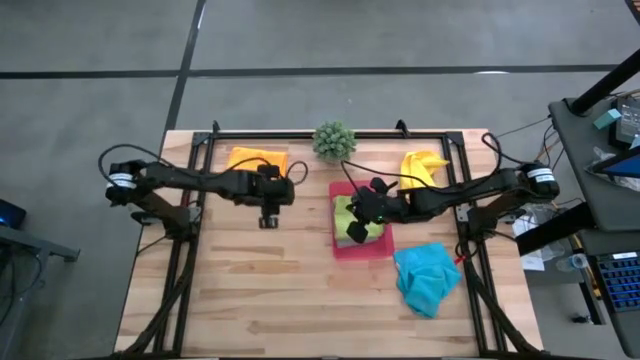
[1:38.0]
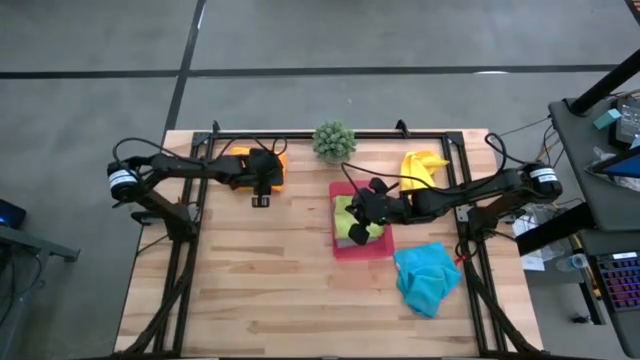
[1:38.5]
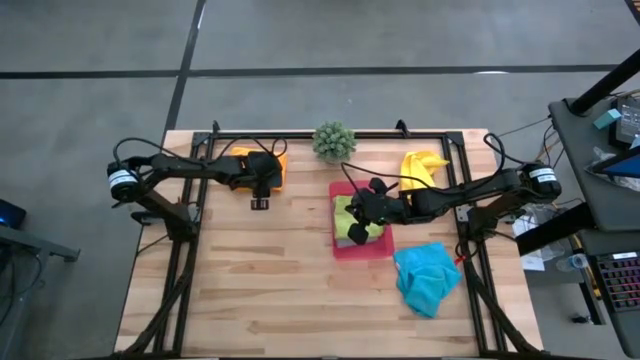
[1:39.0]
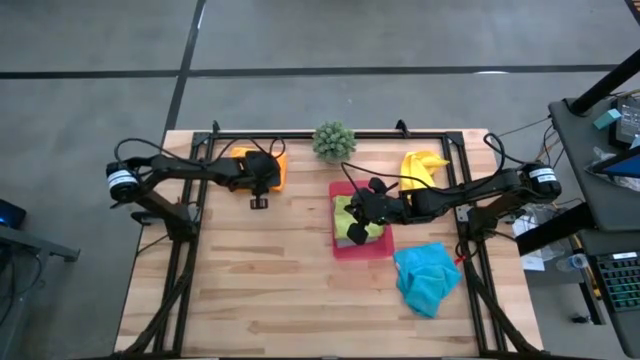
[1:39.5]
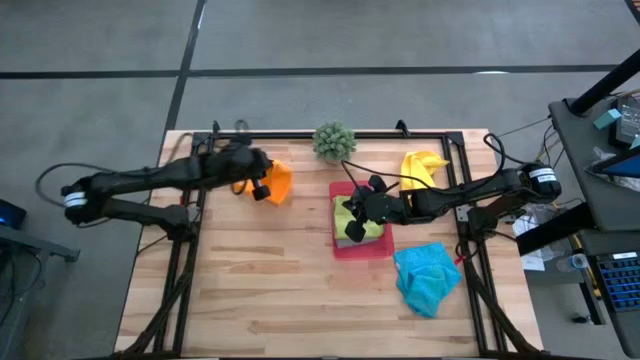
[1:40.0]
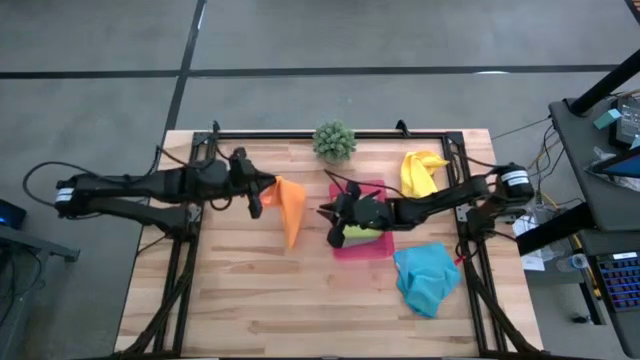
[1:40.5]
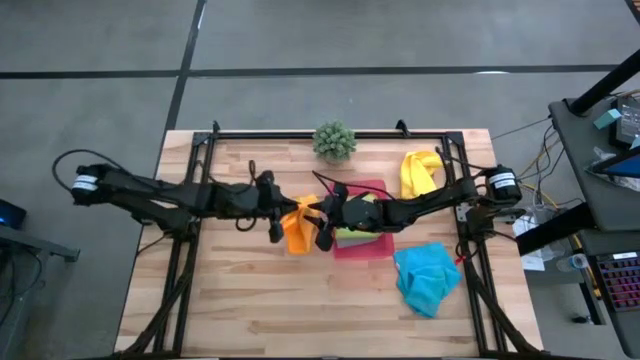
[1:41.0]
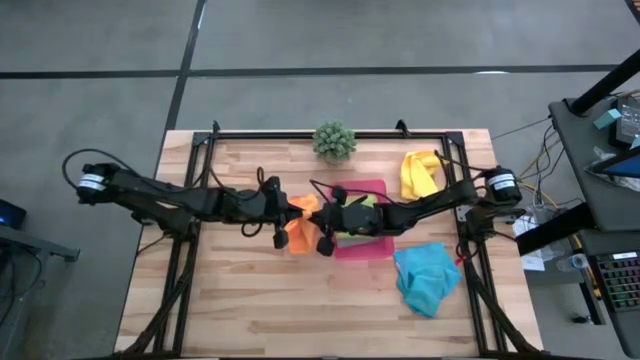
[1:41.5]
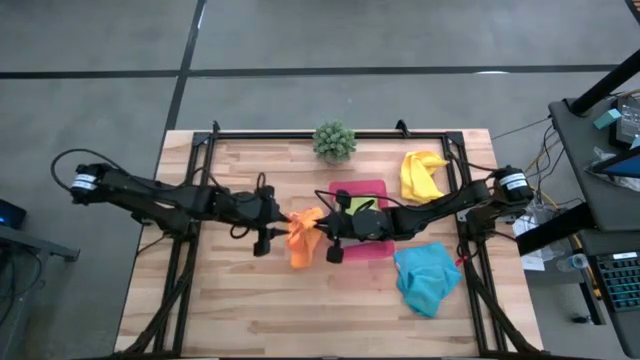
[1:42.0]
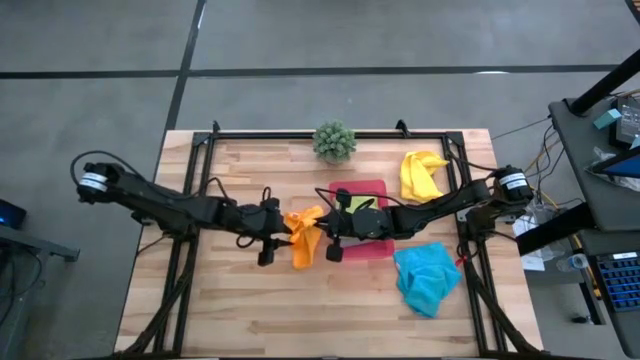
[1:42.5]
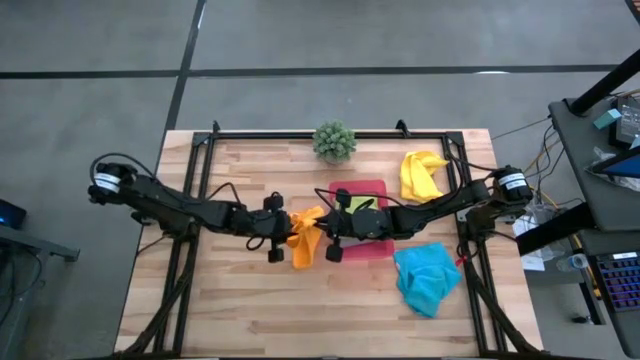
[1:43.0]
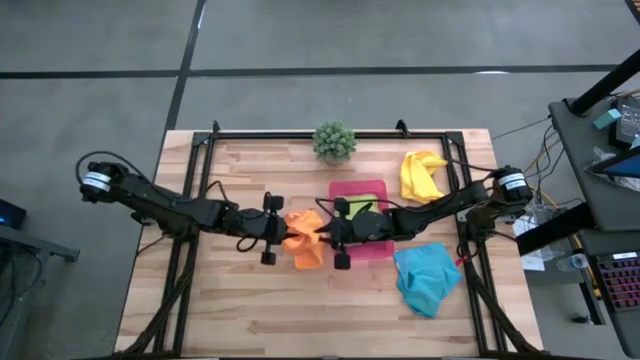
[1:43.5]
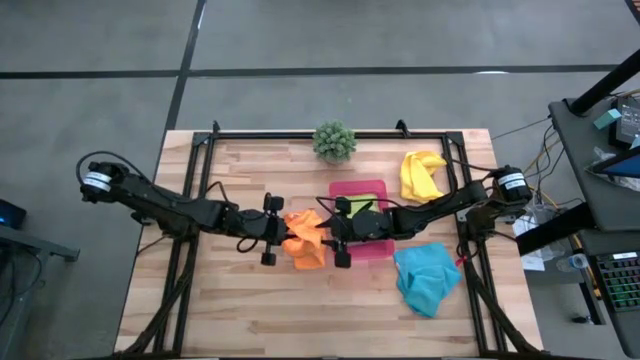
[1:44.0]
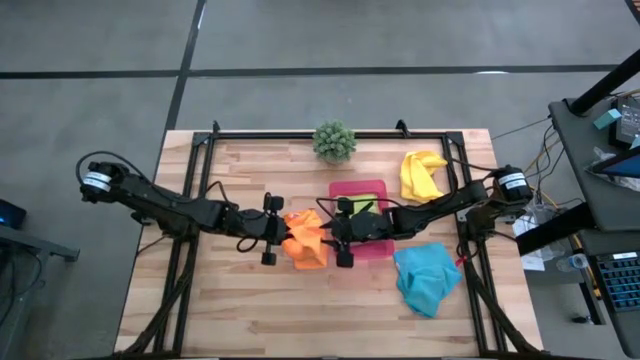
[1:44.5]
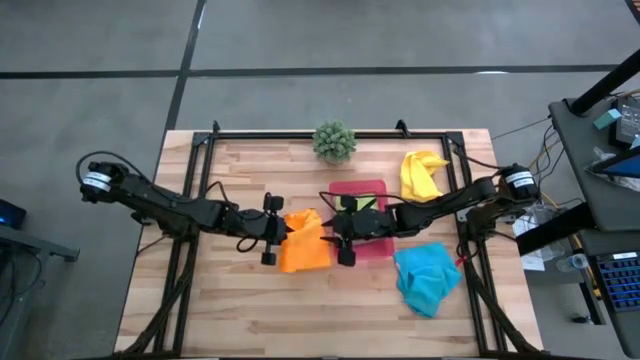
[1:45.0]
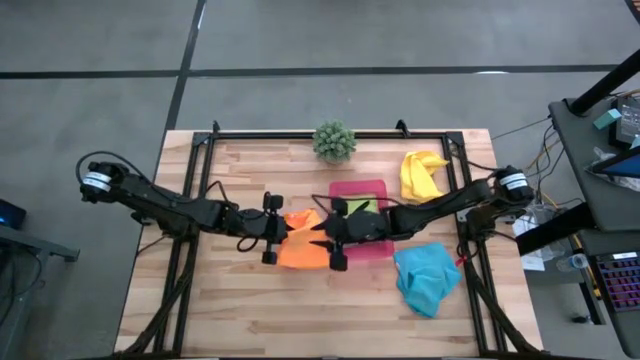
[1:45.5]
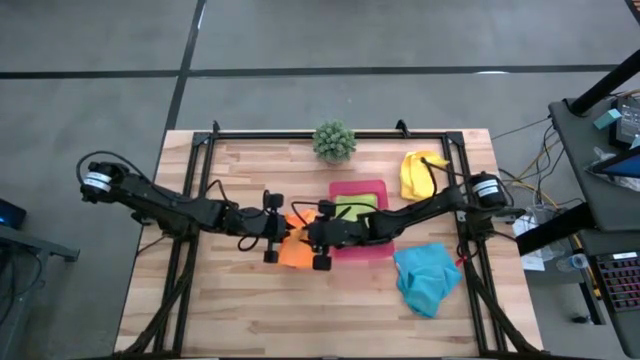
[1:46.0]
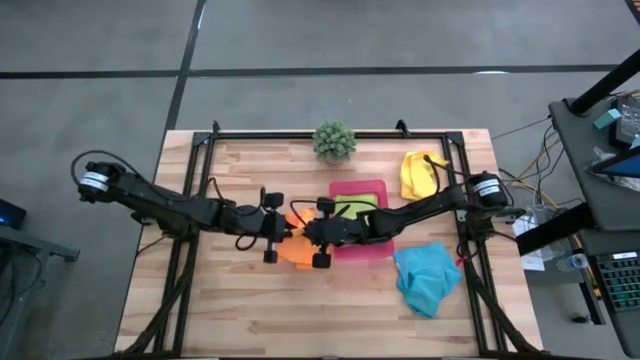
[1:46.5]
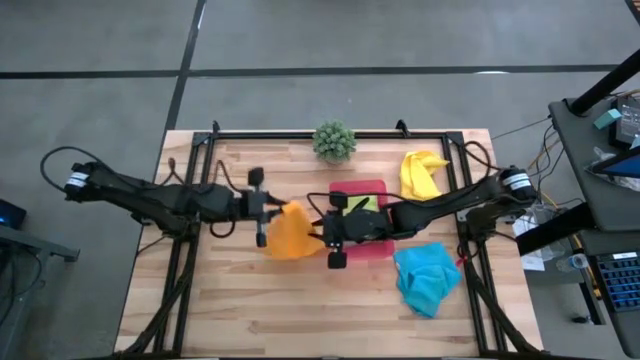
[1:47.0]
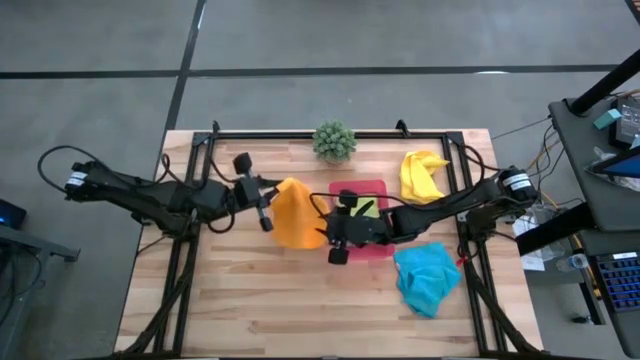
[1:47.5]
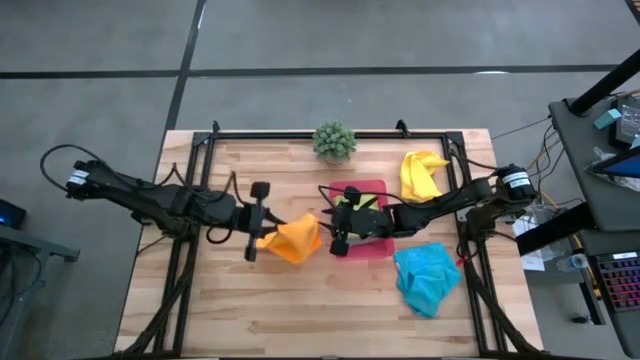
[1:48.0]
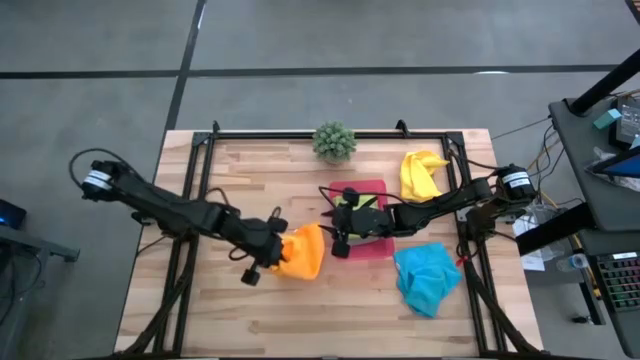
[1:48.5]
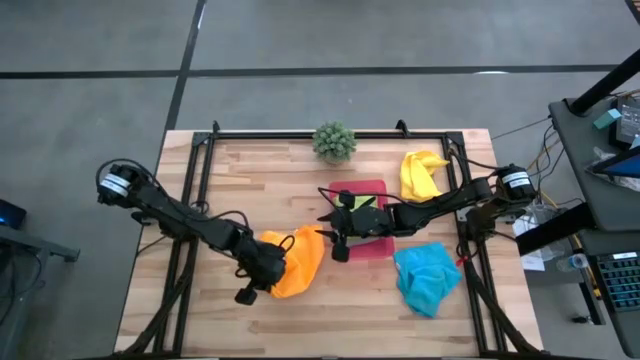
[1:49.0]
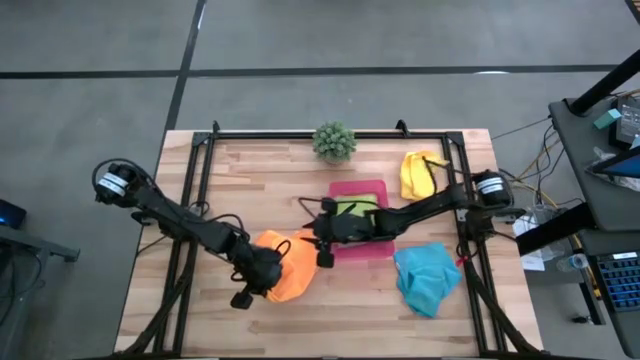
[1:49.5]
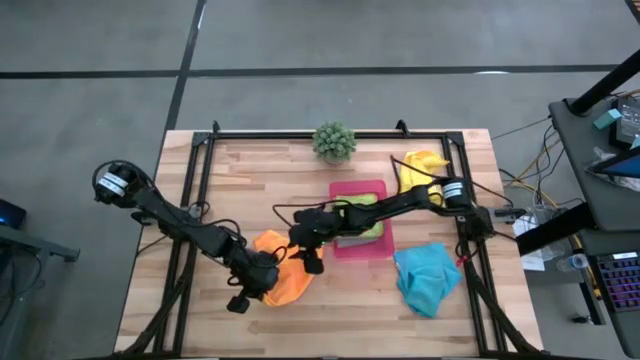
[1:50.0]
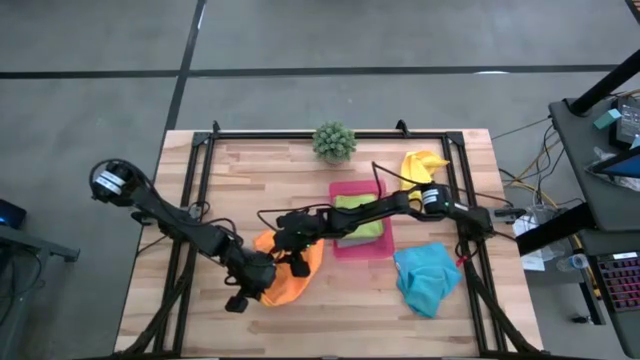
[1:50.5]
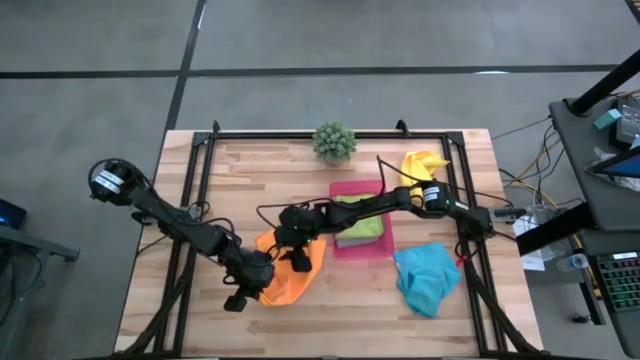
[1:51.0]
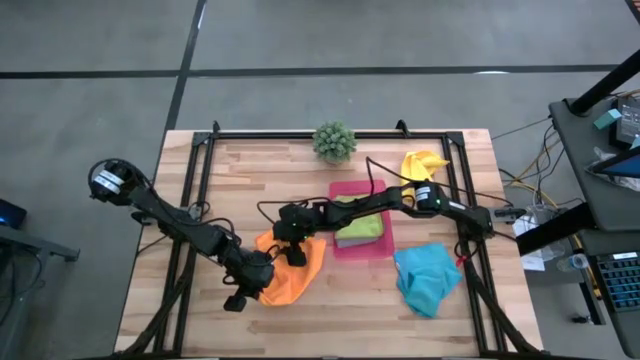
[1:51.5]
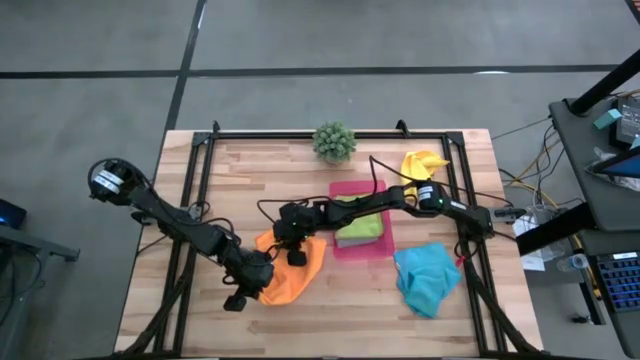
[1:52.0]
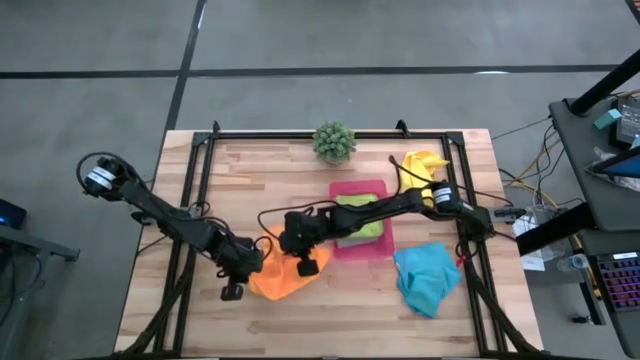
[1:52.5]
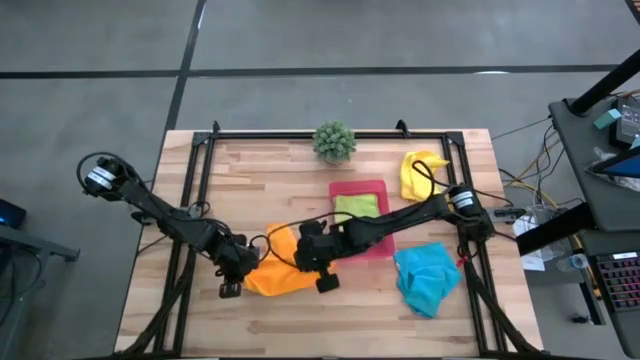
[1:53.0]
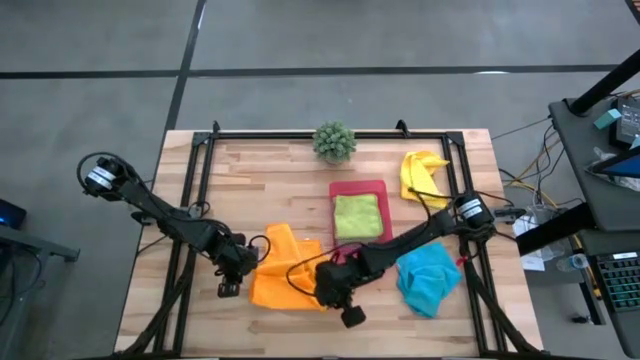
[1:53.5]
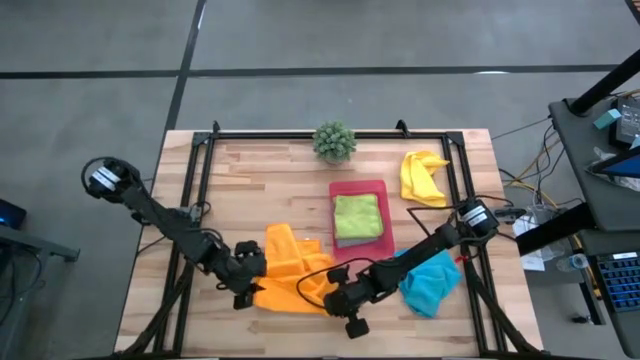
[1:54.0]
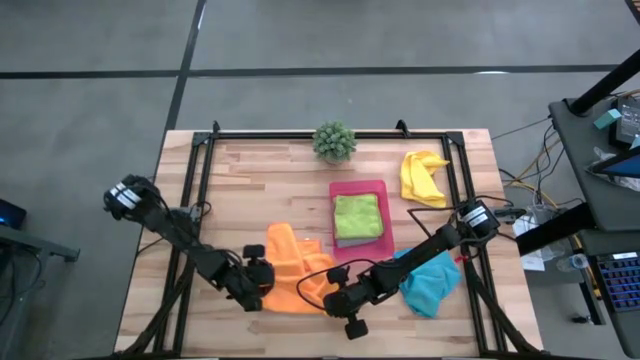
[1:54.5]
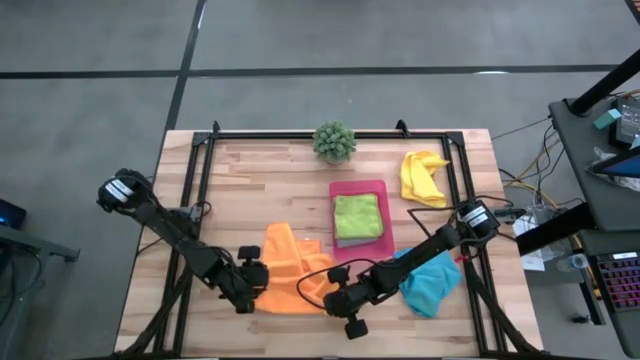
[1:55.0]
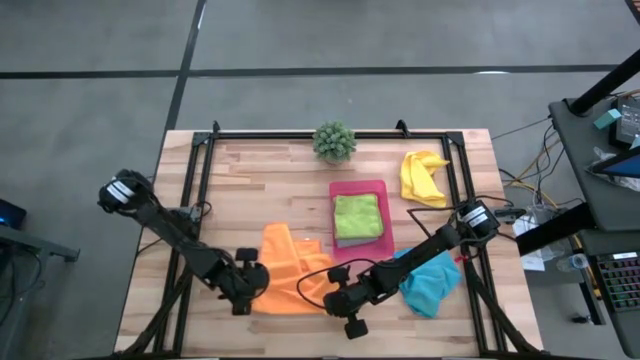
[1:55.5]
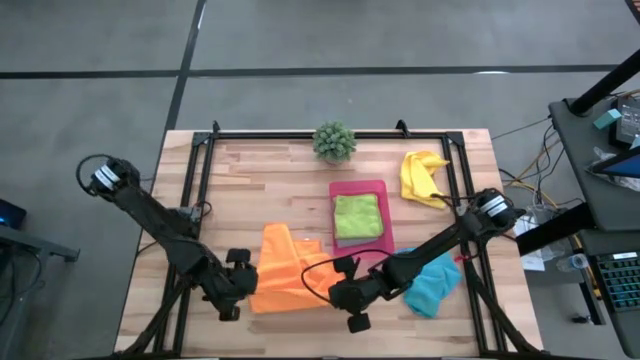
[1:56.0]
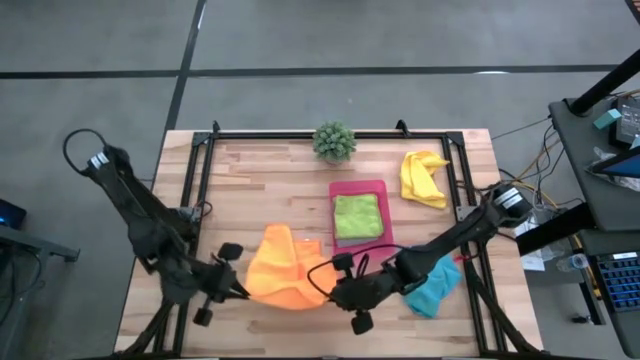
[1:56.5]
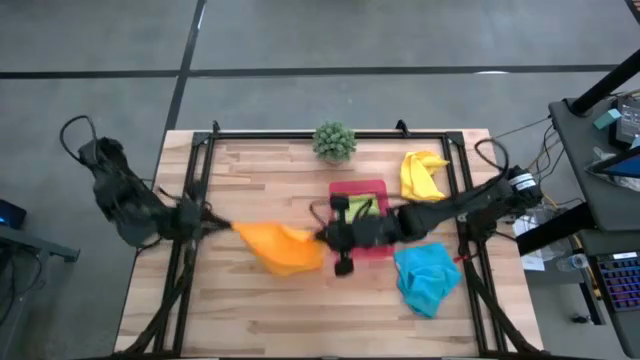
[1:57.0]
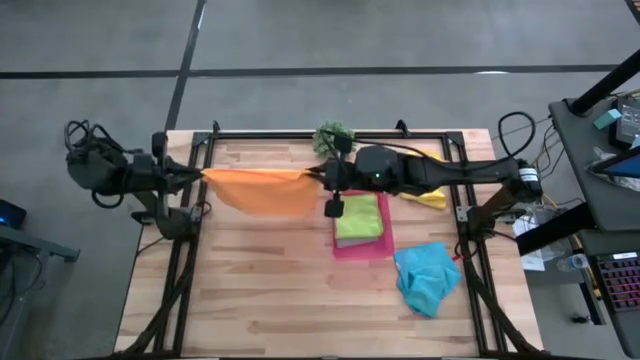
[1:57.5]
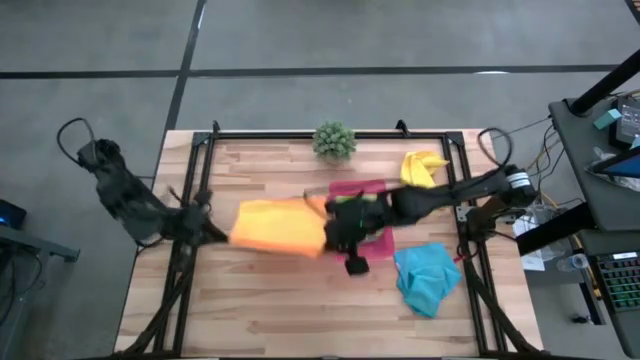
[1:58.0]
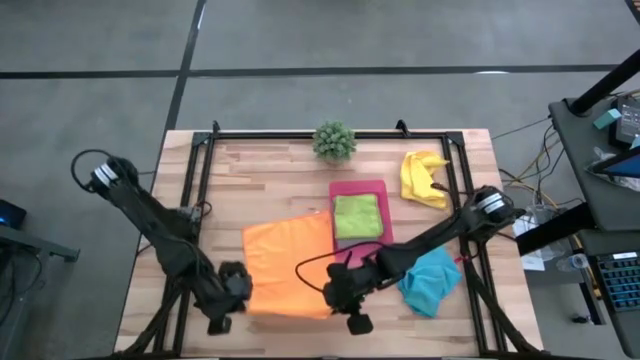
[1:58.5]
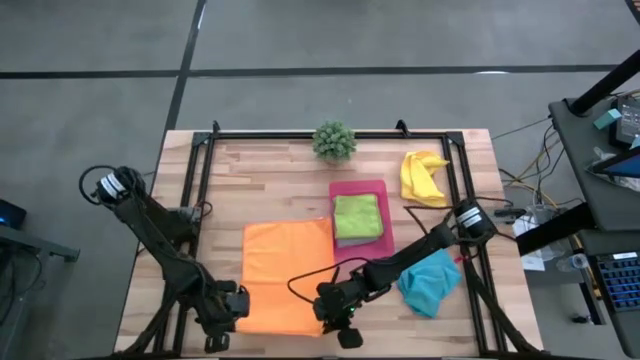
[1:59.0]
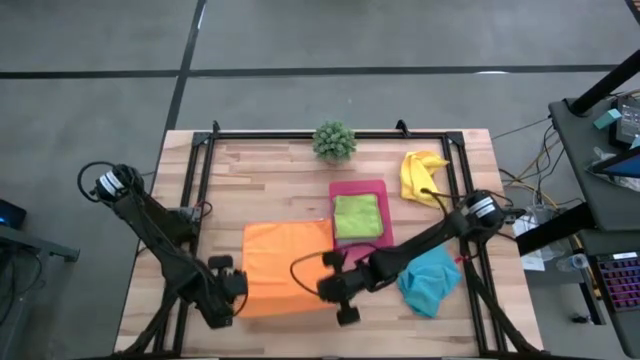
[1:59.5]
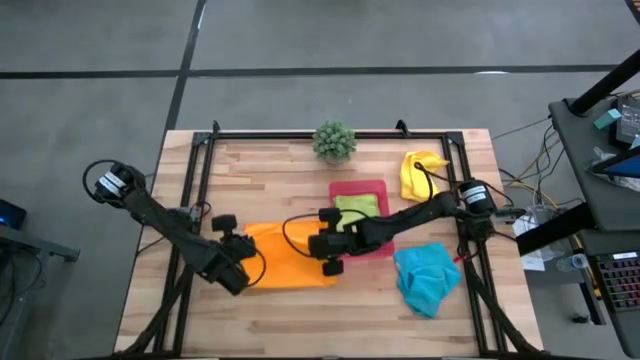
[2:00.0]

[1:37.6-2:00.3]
Task: Fold microfiber towels
Fold the orange towel
